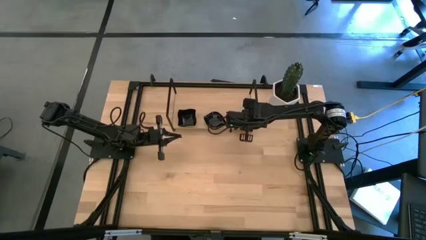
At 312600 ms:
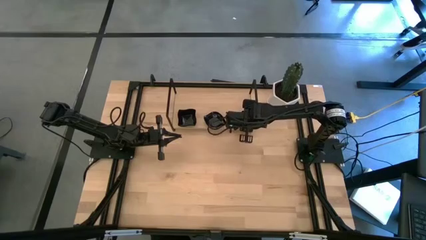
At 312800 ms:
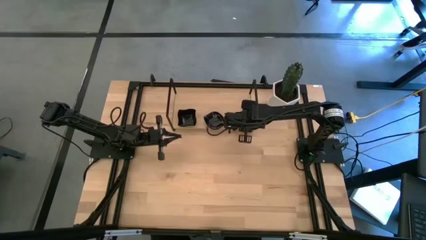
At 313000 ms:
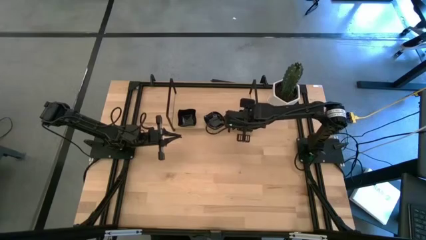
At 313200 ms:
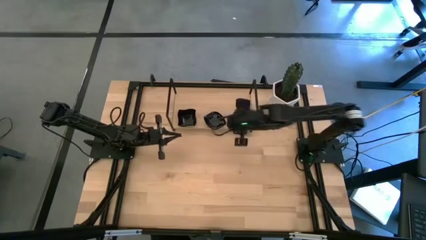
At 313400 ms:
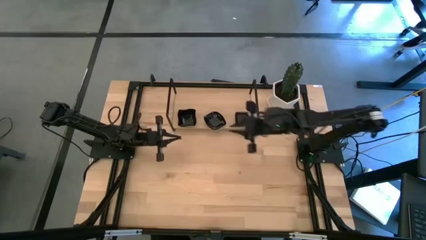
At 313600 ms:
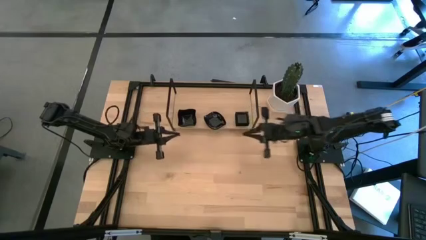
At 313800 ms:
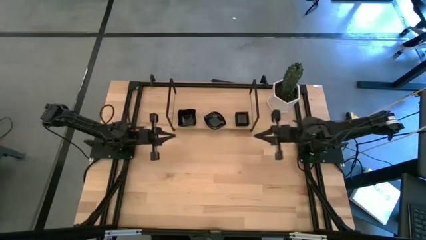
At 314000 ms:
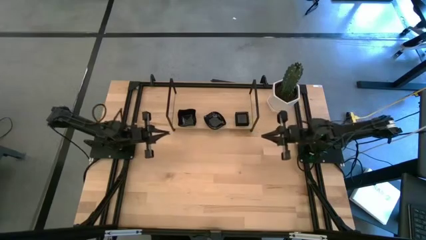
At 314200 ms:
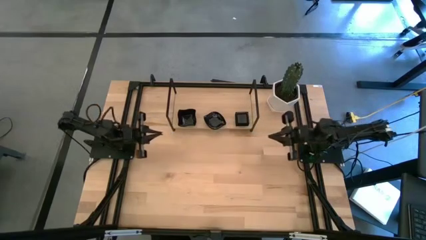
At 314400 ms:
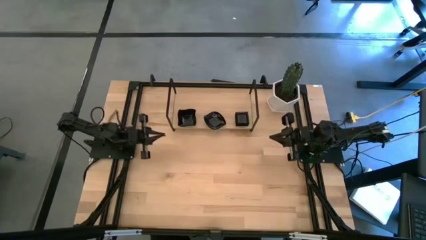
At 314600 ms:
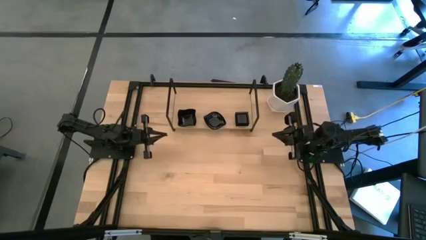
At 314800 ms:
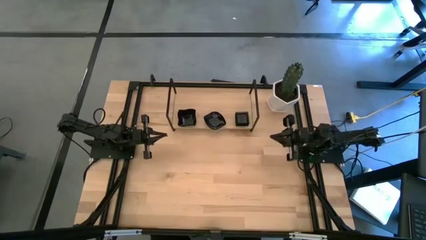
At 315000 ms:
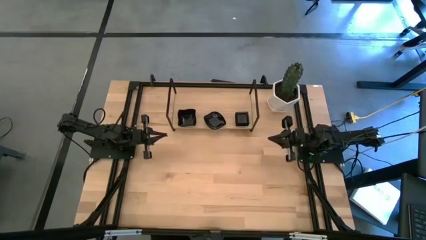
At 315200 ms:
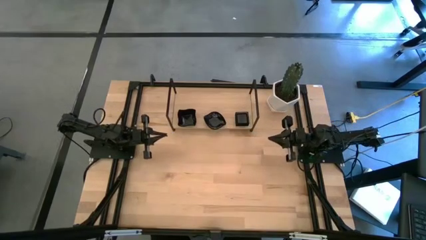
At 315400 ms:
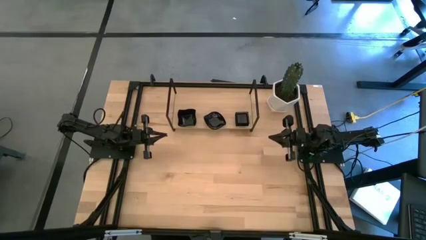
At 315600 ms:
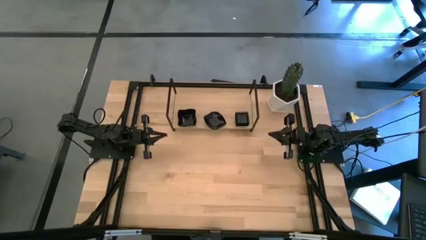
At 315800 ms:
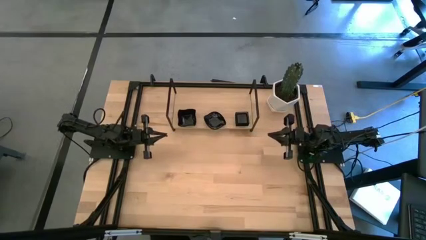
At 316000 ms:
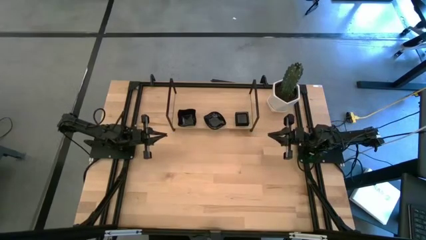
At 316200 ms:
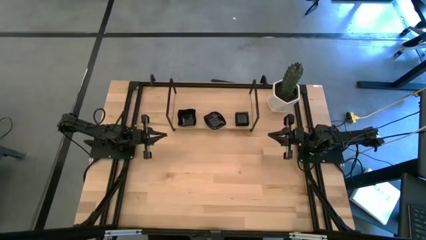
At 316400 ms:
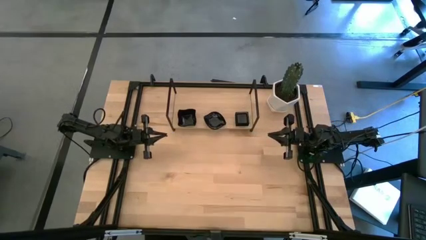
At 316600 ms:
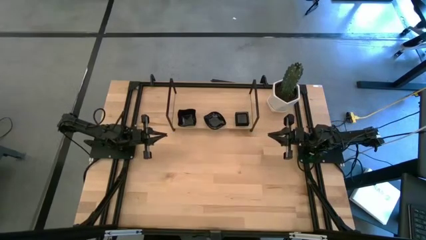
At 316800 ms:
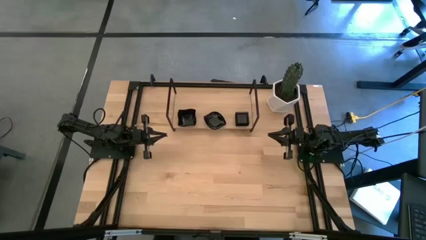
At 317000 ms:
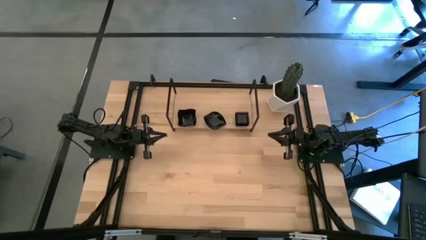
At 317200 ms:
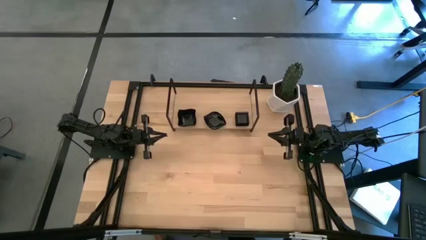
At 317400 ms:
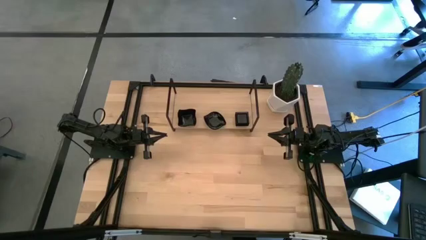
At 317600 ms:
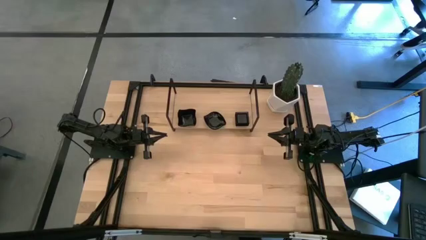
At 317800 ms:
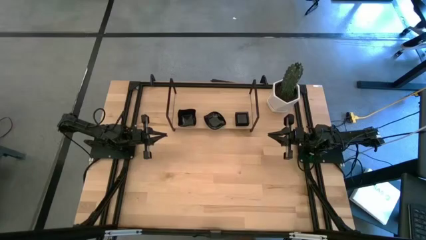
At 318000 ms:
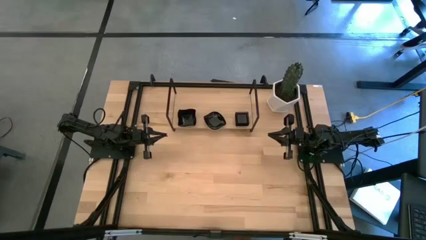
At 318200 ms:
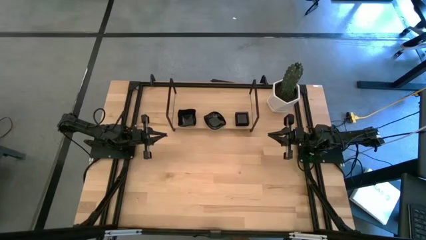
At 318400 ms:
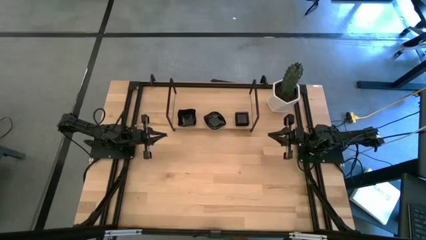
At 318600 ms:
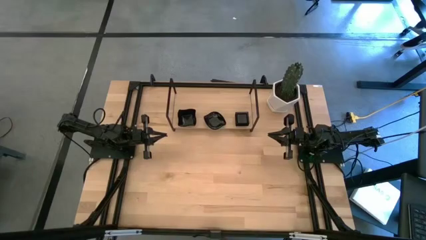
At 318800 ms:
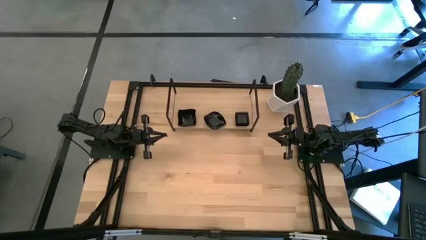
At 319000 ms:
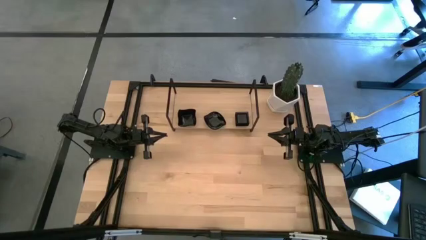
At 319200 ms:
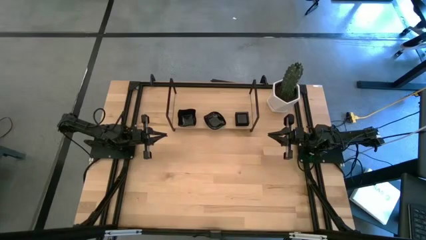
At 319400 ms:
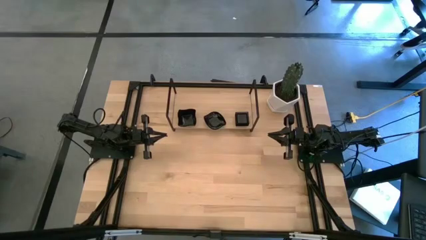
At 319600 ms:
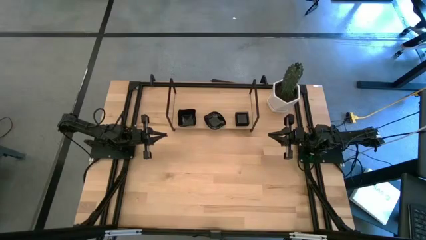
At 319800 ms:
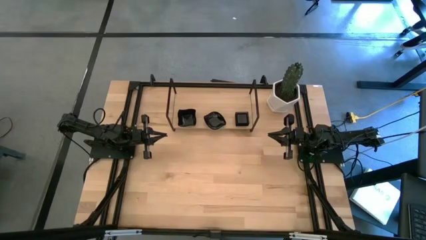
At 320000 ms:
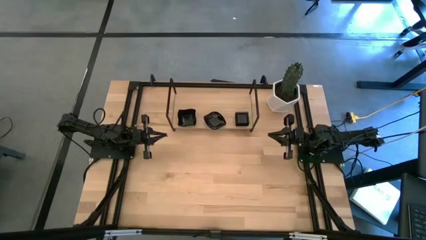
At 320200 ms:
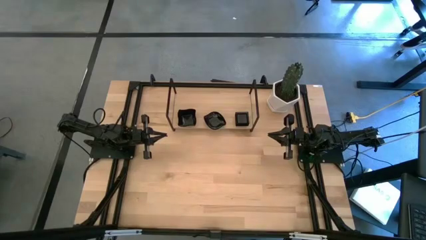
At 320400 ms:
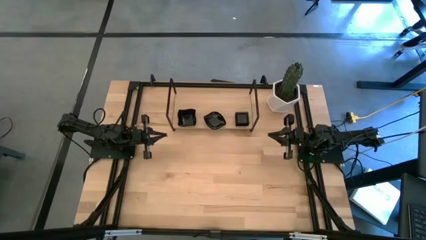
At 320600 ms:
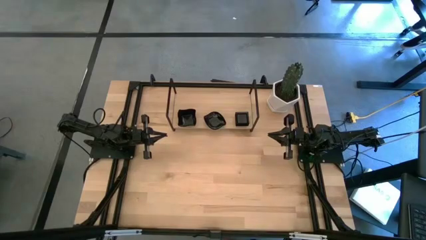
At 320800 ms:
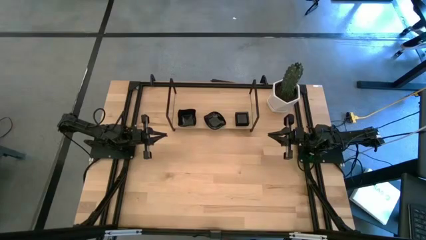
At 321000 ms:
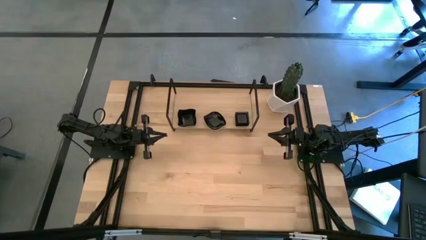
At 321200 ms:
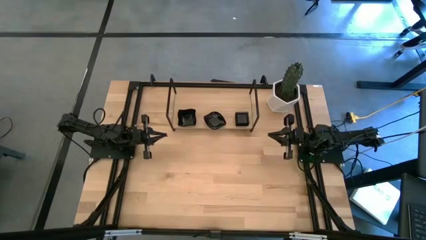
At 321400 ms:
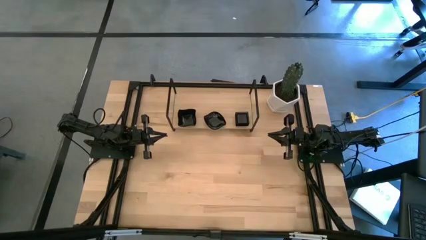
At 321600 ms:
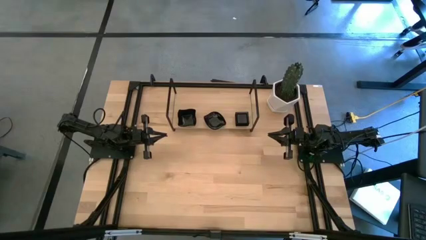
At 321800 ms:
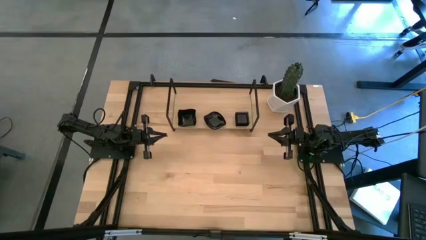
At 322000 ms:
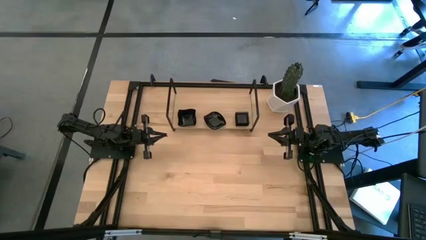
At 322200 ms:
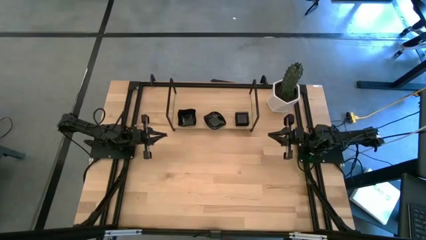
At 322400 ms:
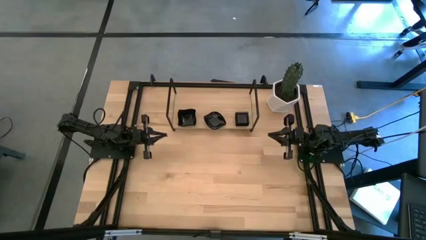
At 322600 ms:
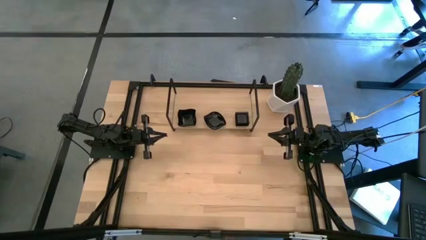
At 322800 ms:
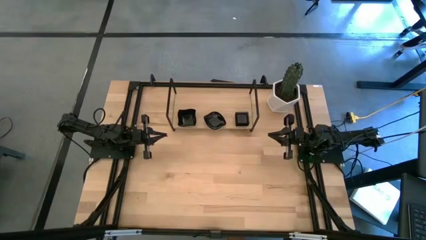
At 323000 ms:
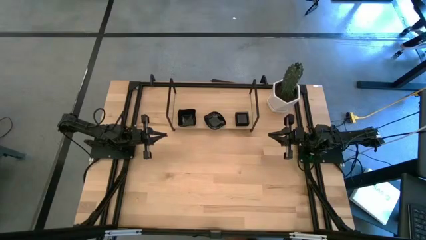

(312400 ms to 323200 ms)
Task: Pick & Place Mini shaped plates
Return to Home Position

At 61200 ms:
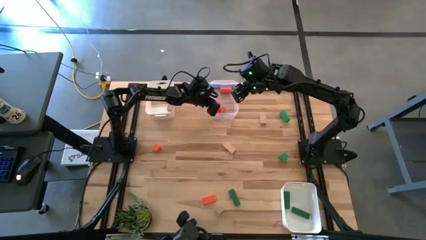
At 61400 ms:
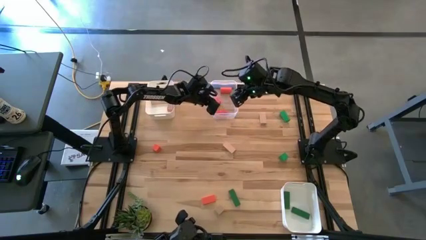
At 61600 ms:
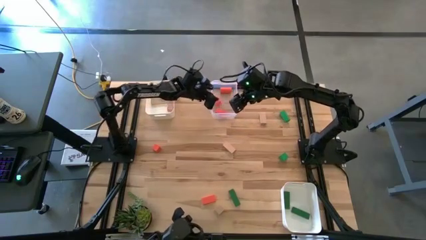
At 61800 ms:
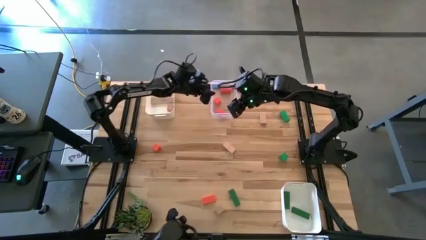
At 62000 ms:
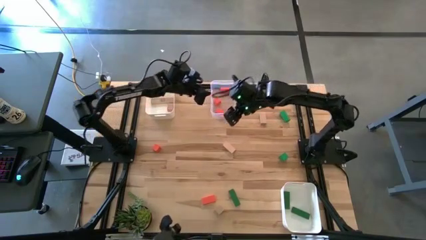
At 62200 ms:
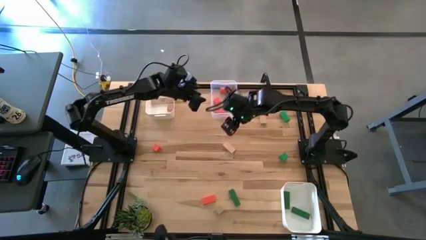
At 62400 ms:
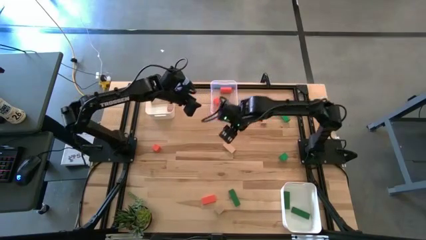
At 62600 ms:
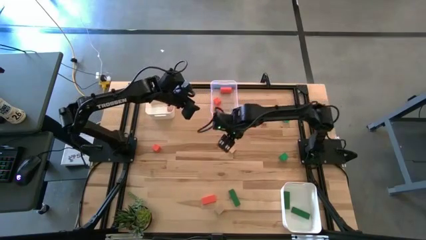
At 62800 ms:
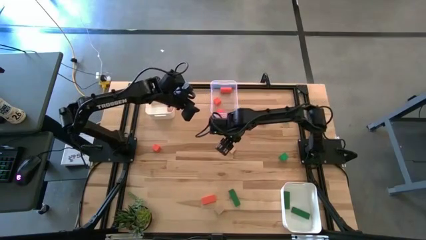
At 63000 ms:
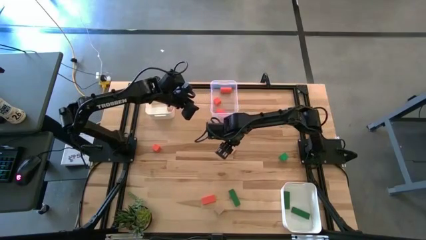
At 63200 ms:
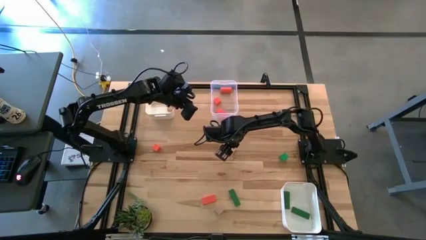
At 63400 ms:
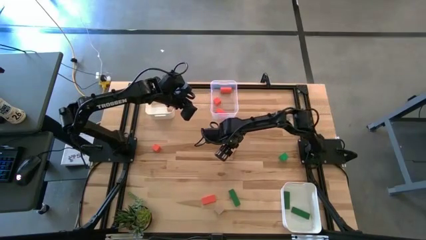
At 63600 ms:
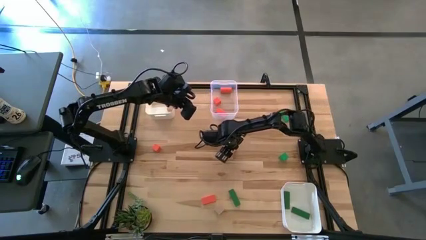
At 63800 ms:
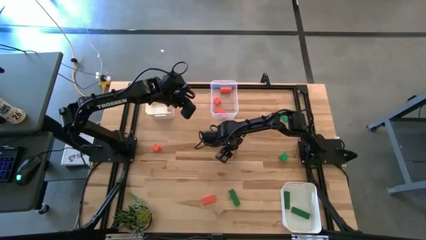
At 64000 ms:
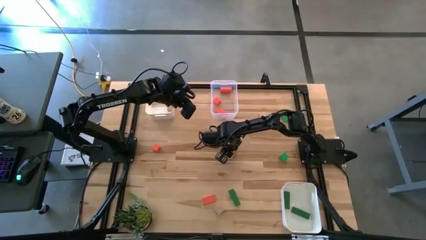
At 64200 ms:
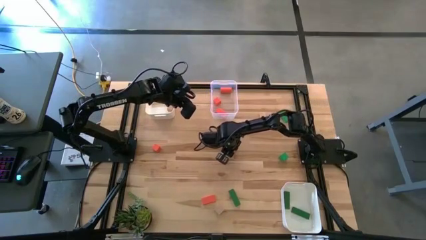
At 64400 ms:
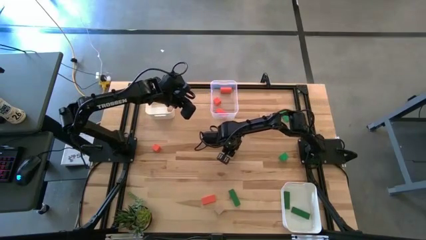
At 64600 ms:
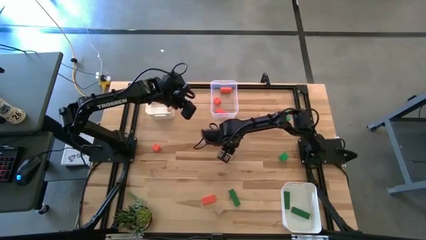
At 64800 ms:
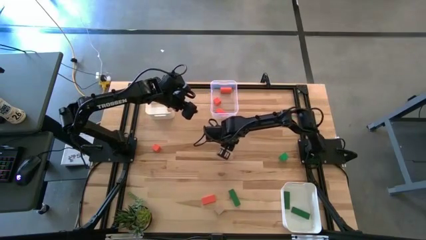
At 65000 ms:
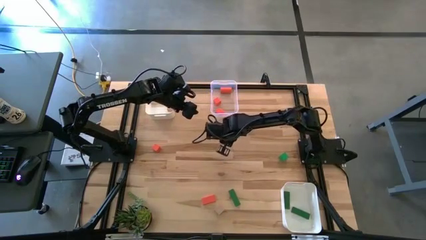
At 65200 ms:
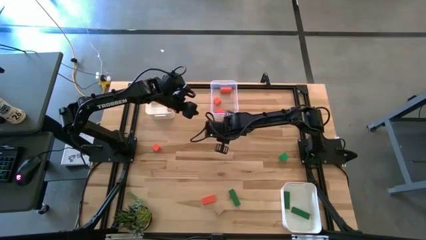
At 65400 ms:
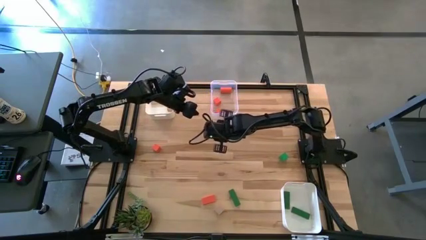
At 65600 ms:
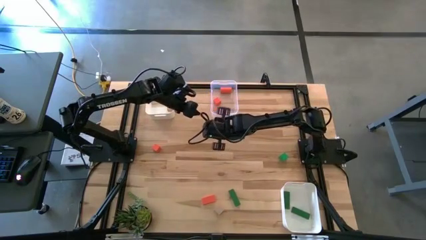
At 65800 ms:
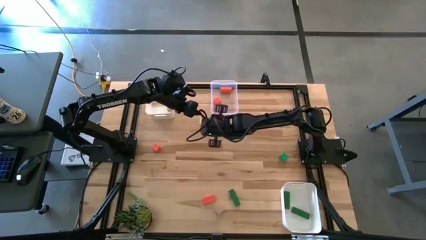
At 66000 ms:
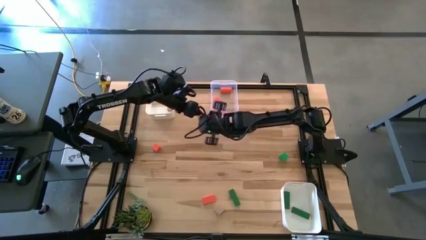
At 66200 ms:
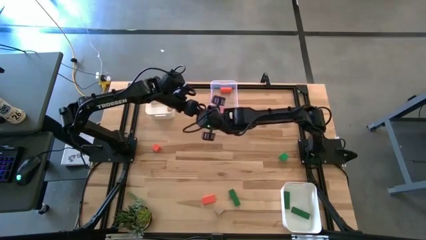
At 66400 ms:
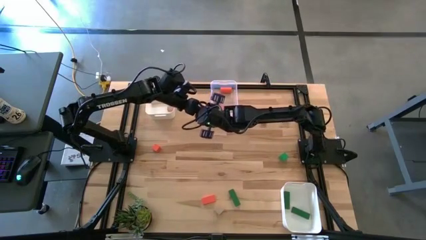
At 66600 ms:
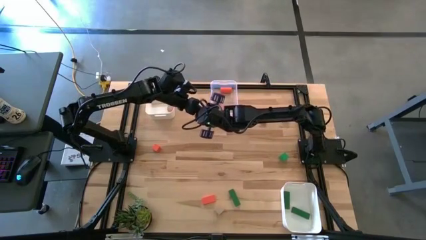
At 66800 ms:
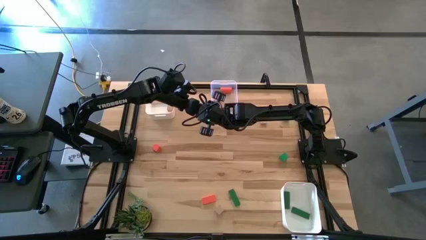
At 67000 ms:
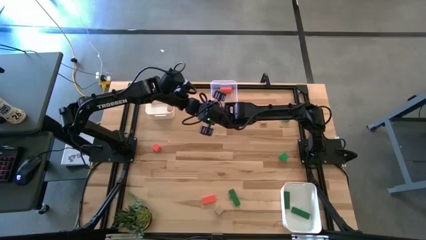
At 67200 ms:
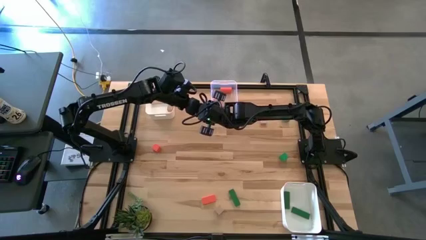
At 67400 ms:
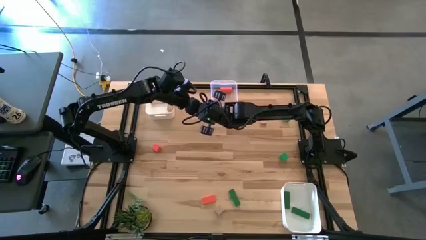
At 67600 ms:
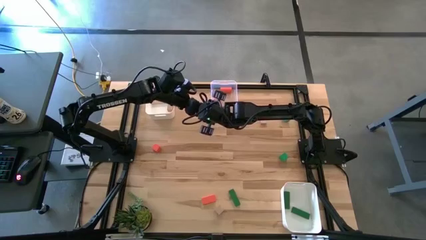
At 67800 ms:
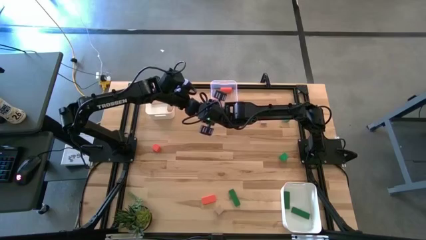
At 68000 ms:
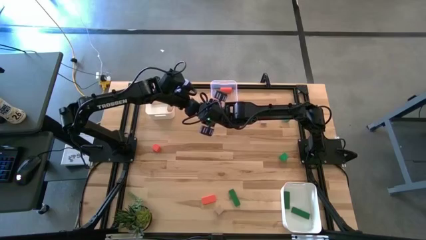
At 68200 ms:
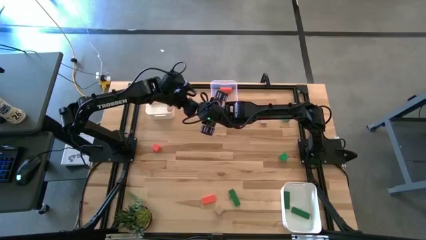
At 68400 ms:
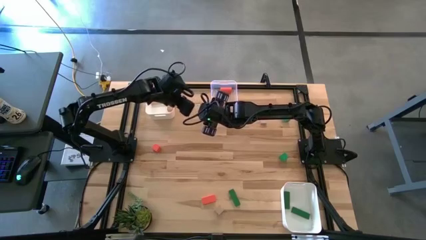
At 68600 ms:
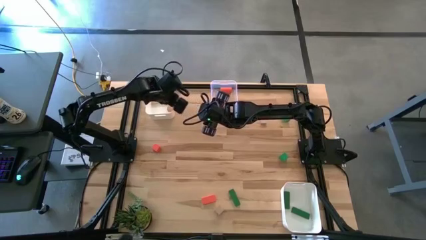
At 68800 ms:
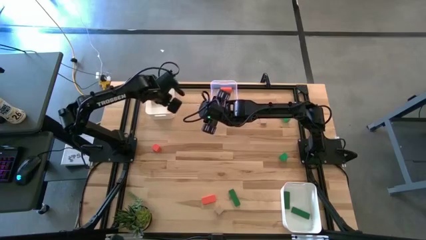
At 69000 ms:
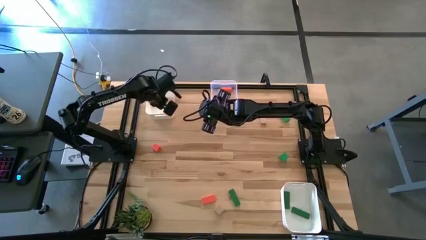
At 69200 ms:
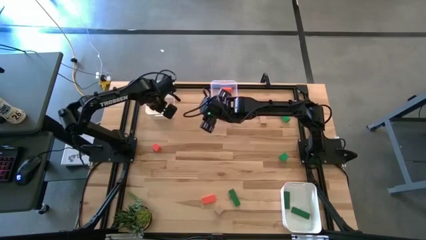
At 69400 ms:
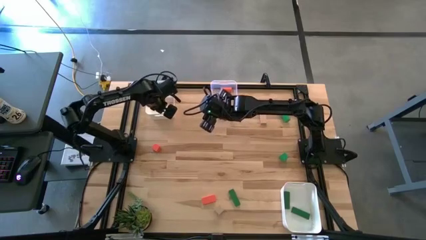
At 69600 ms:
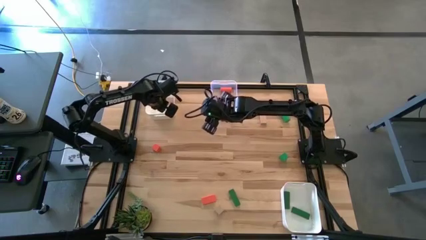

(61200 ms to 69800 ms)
Task: Sort & place blocks by color
Put the brown block into the top white bin
